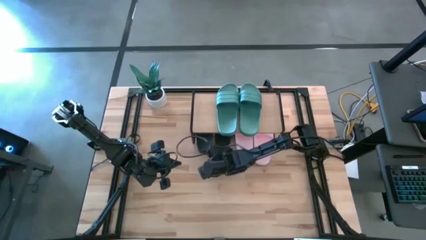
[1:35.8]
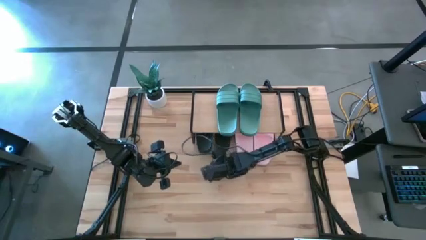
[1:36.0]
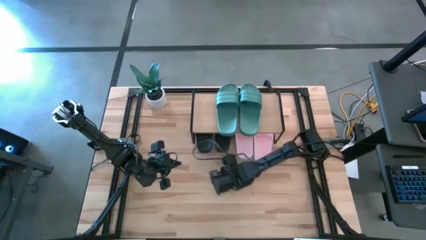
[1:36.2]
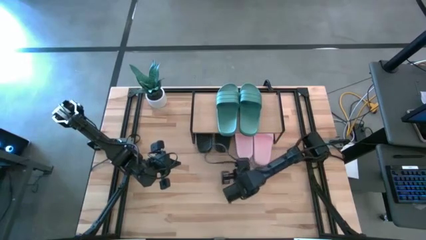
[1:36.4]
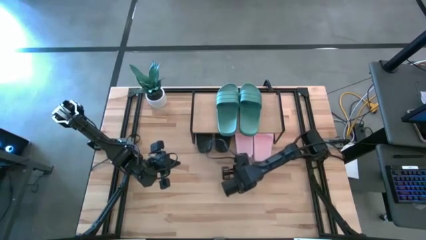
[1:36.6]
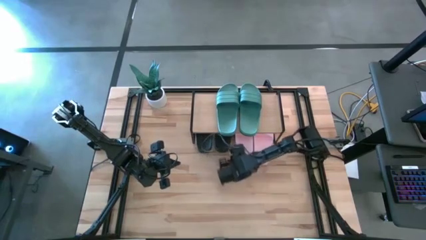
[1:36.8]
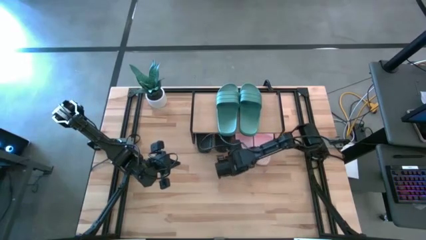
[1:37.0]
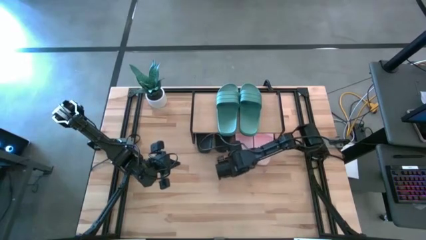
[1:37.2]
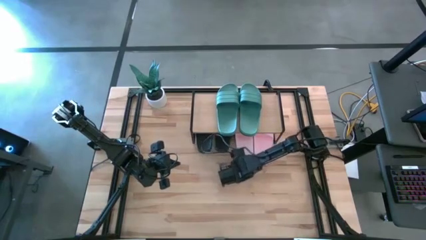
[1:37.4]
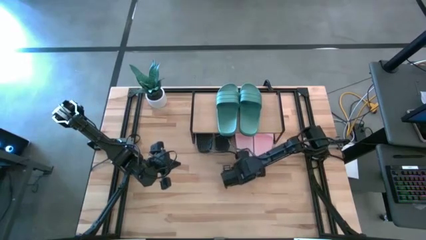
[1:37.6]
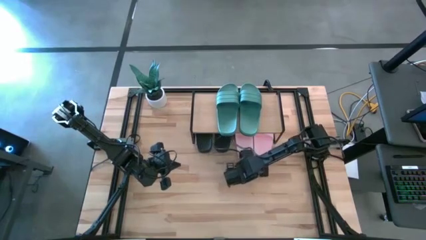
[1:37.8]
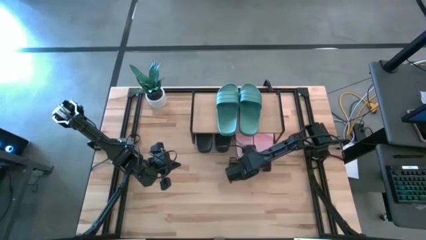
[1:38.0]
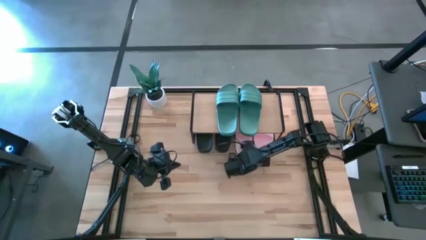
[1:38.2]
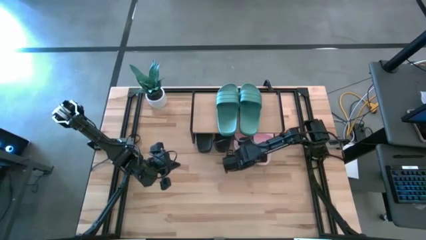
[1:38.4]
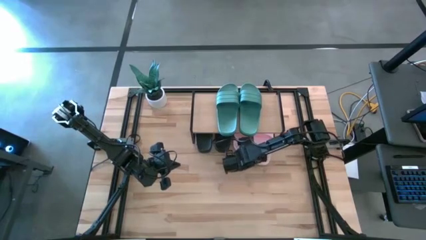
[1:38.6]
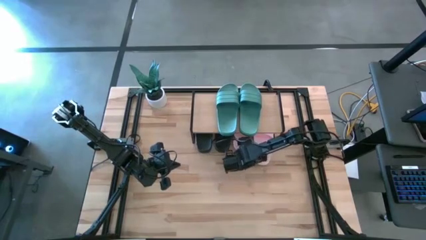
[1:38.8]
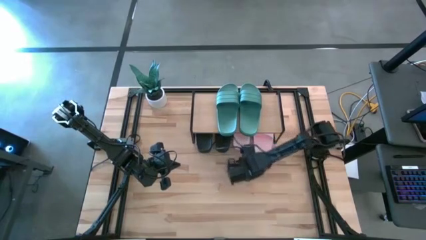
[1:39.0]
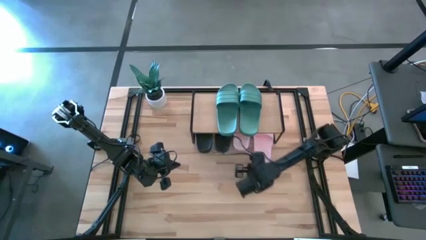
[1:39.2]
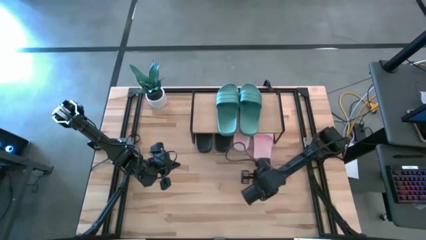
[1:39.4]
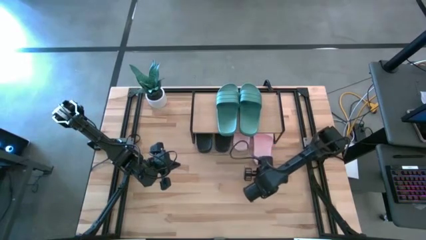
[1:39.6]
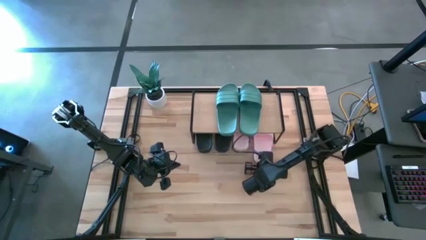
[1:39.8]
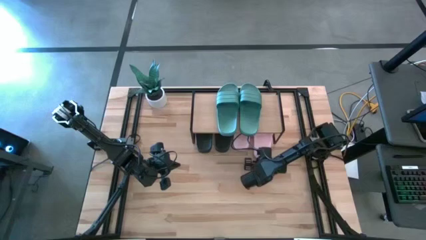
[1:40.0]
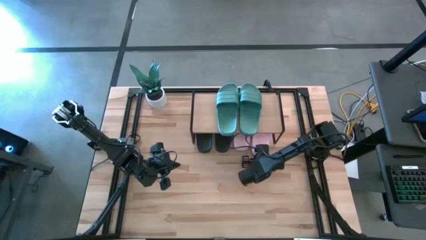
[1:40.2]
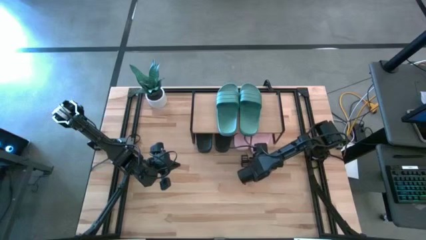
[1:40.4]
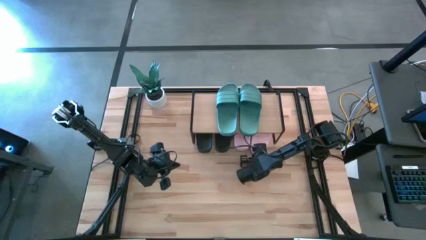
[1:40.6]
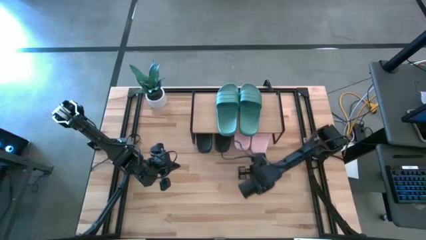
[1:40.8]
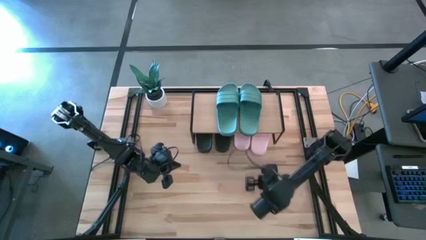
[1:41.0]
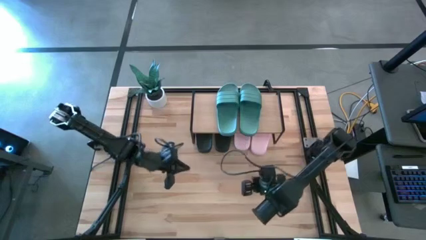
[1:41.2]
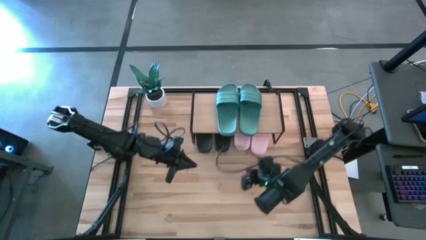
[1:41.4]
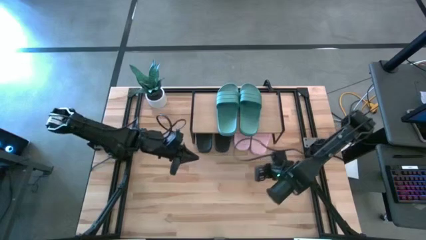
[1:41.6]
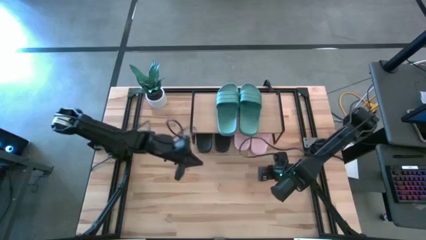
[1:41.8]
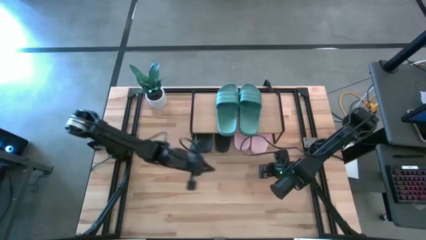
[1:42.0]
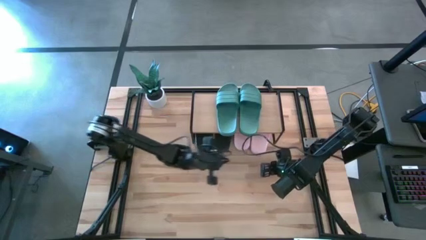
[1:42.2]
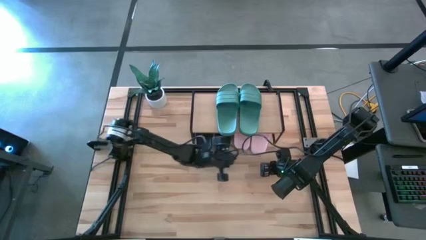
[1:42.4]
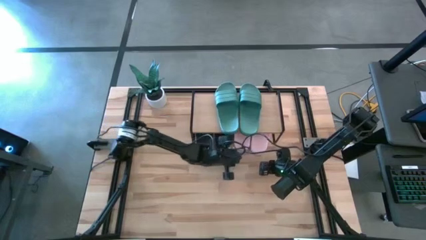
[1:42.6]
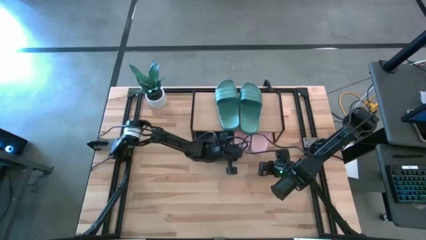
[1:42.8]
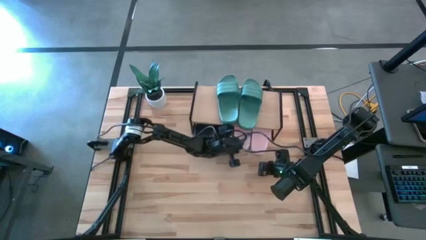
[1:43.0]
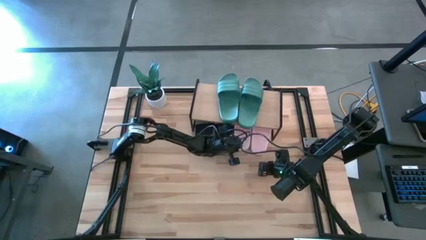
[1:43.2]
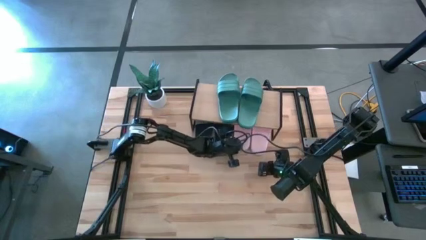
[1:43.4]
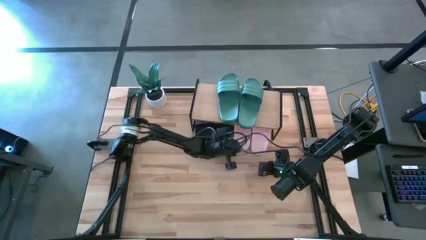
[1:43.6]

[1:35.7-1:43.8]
Task: Pick and place slides into the shelf
Adjust the pink slippers under the shelf

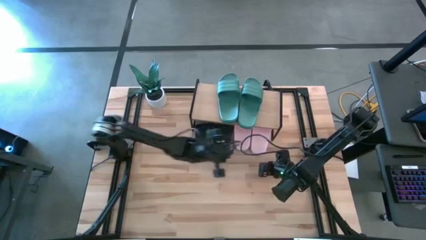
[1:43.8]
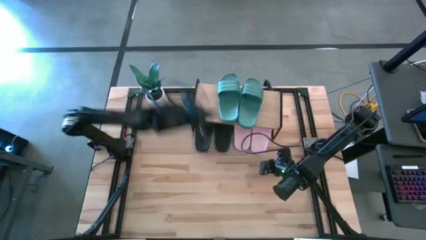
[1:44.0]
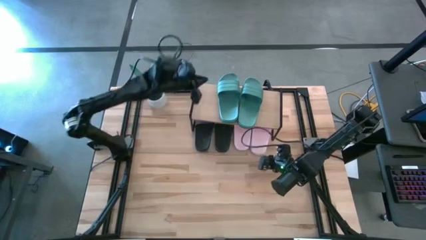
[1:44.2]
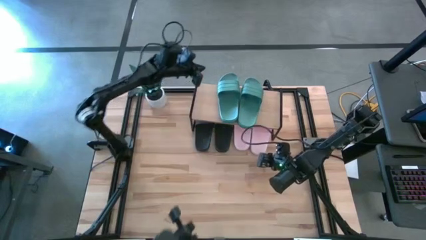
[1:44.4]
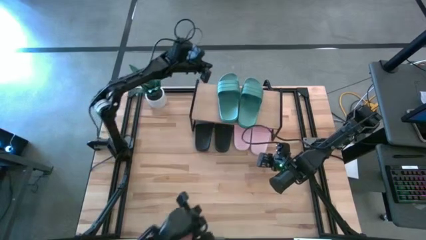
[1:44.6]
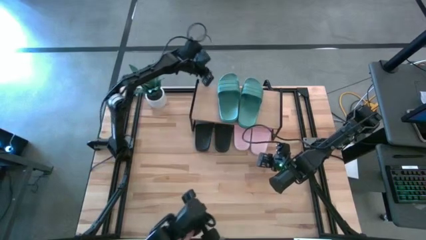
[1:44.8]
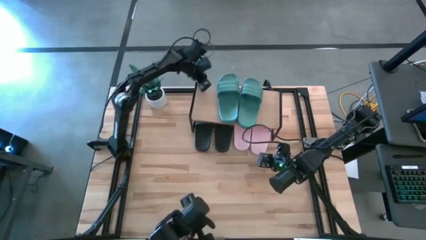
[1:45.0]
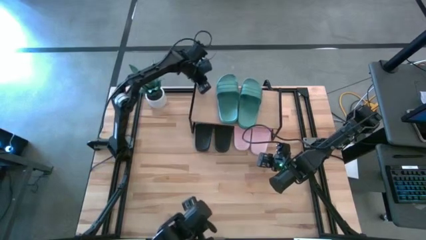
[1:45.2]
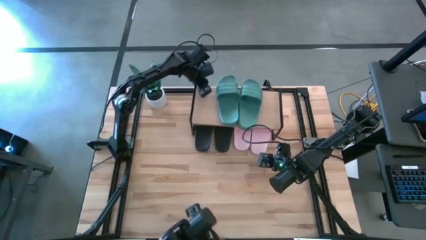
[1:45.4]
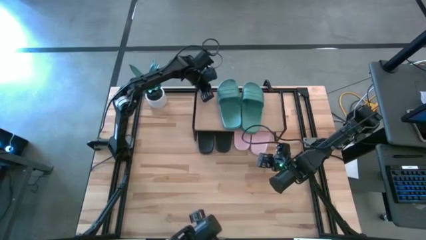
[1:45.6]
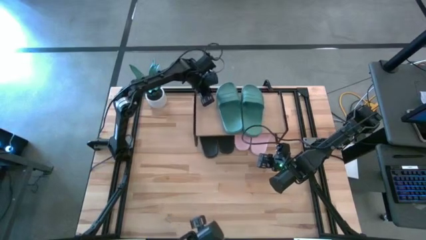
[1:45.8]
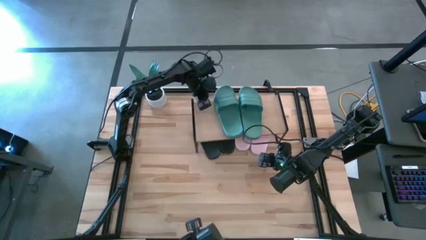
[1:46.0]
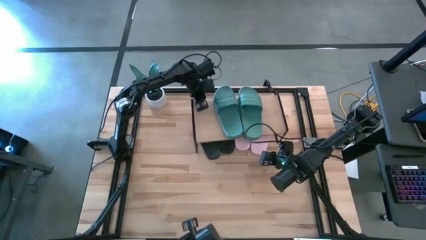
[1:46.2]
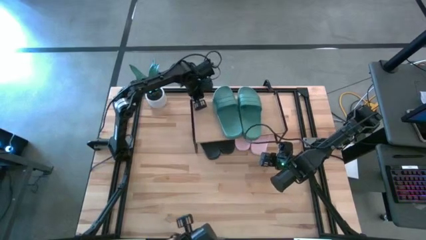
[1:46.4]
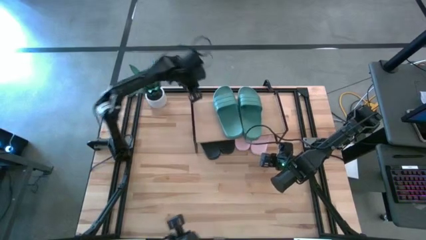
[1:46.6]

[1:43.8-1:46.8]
Adjust the shelf

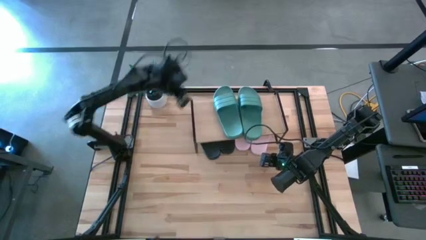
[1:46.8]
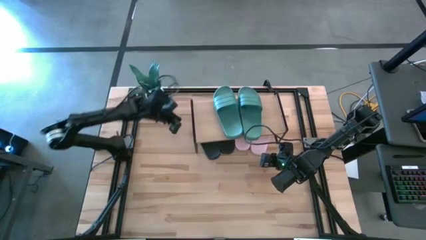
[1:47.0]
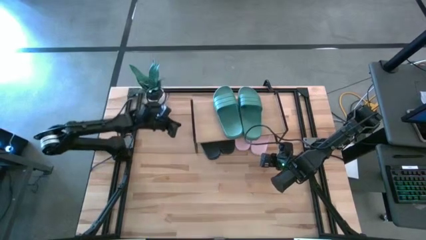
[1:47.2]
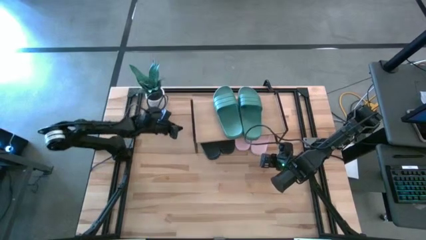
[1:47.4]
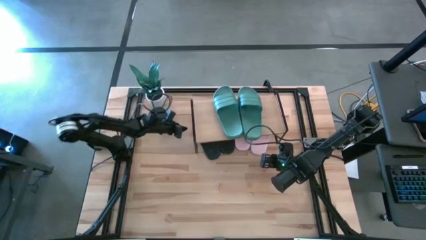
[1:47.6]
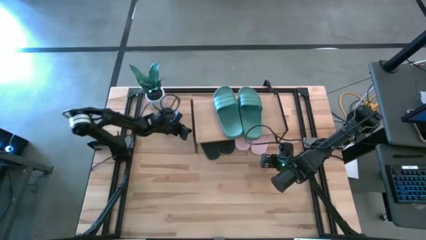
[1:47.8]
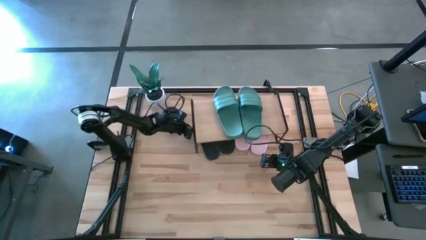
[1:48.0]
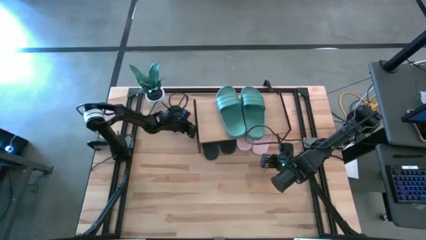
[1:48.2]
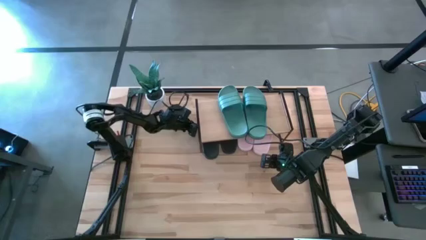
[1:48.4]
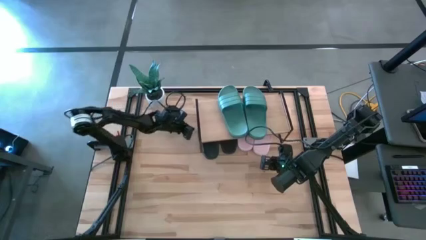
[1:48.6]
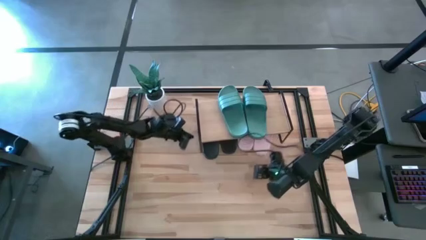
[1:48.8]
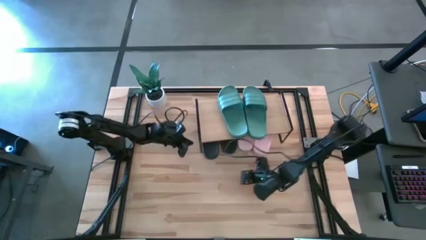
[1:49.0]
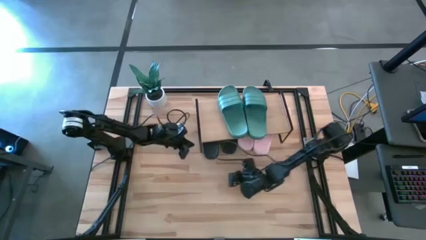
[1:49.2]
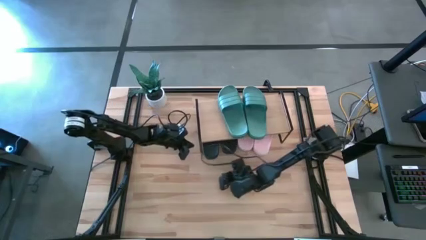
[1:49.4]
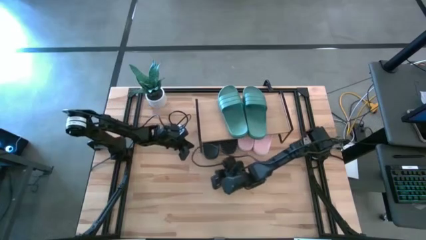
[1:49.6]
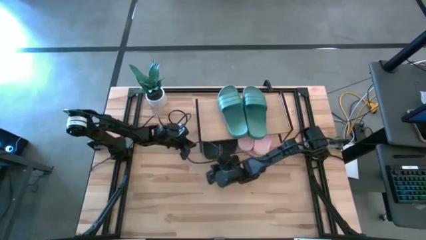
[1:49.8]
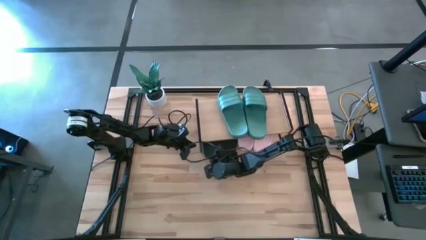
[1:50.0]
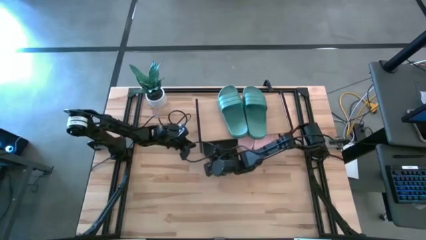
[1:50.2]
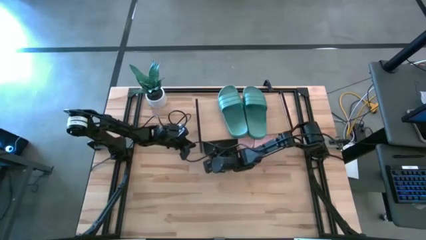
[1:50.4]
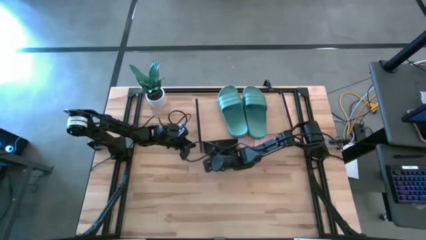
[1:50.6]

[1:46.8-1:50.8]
Adjust the black slippers under the shelf

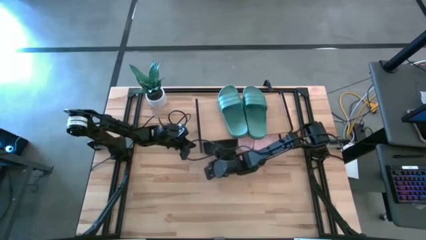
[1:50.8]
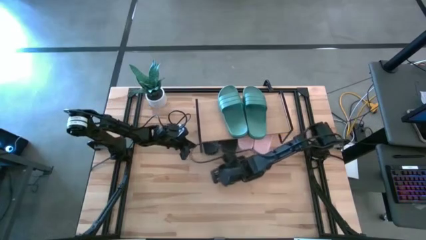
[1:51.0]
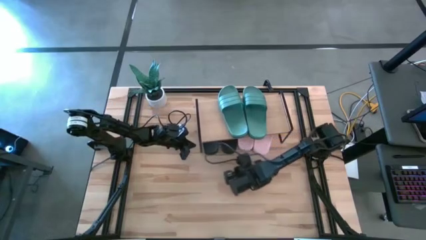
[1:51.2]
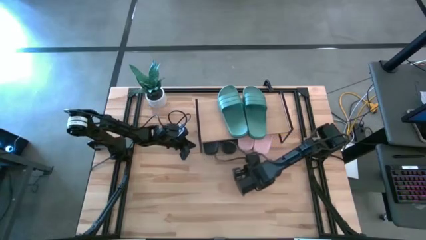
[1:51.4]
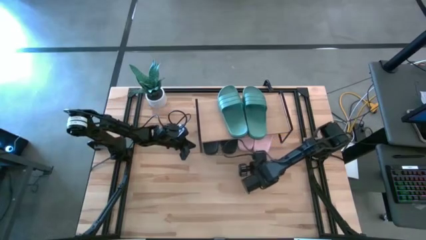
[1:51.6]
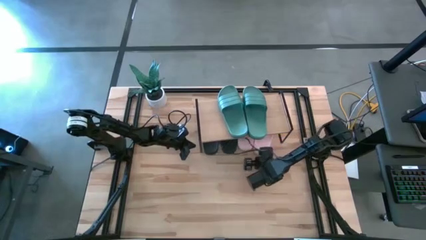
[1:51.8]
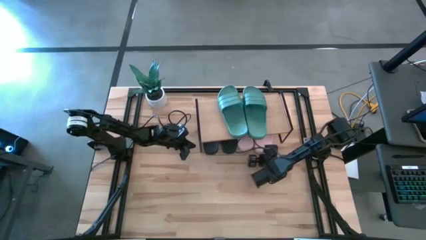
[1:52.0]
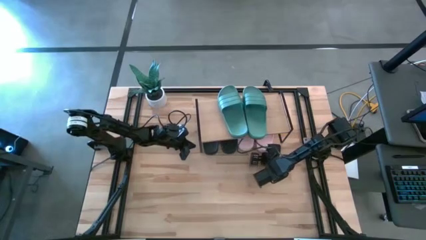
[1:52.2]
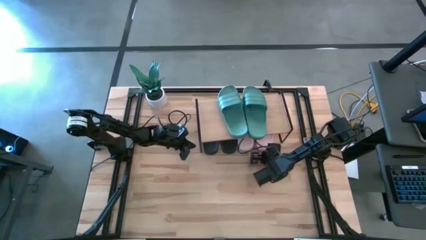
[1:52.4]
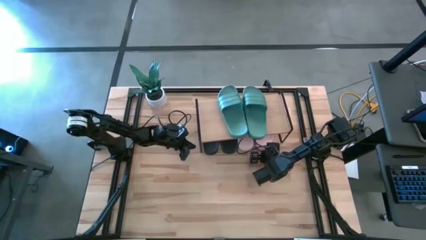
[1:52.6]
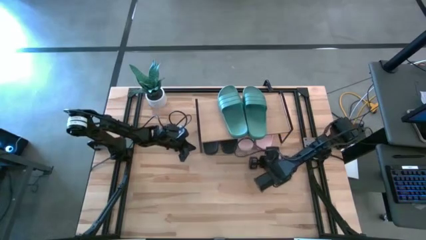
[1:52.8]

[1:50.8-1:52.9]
Adjust the right pink slipper under the shelf
